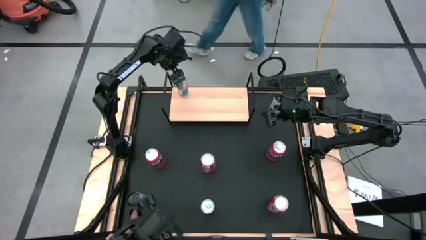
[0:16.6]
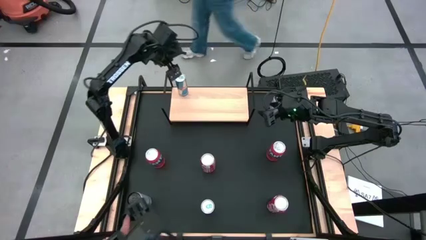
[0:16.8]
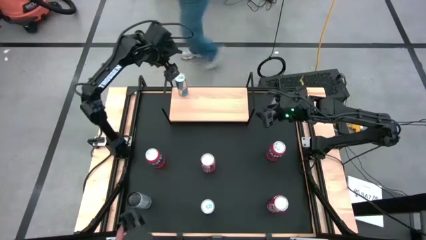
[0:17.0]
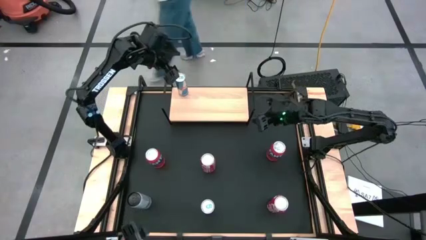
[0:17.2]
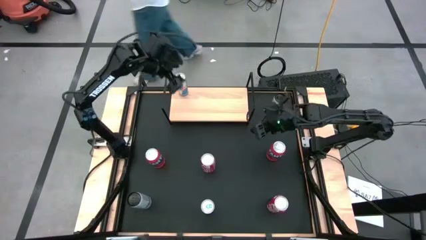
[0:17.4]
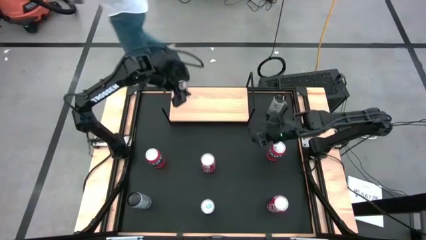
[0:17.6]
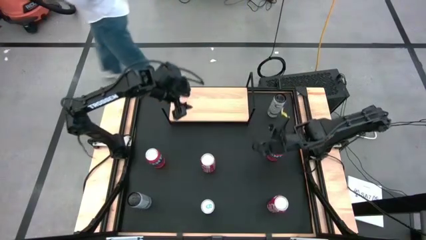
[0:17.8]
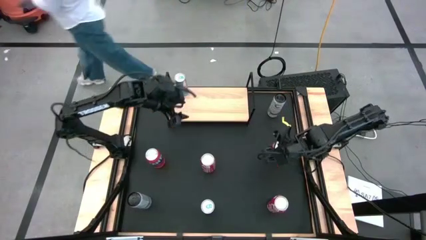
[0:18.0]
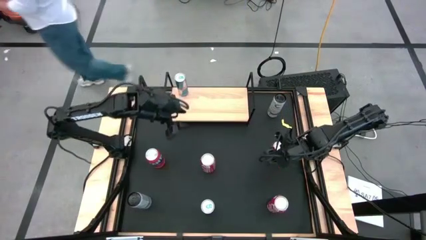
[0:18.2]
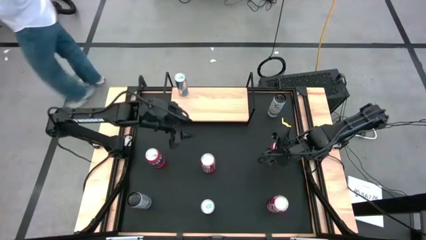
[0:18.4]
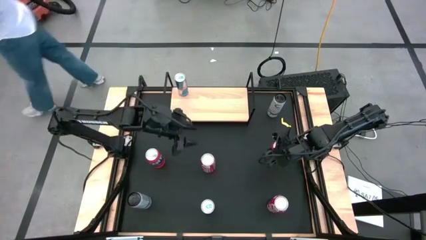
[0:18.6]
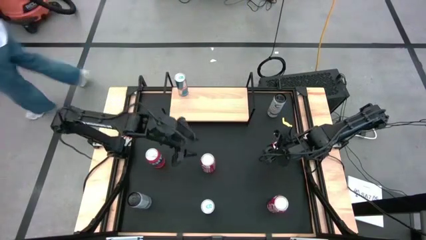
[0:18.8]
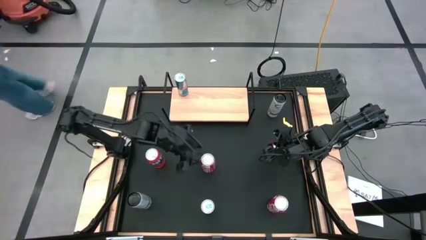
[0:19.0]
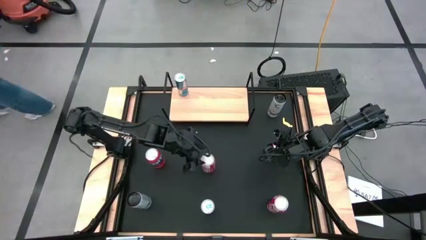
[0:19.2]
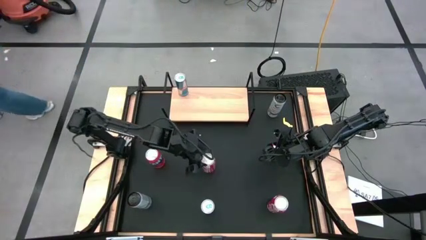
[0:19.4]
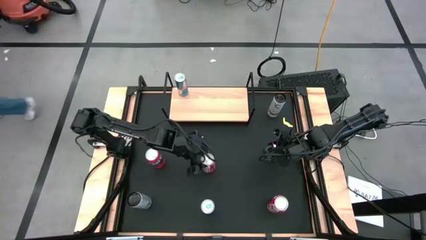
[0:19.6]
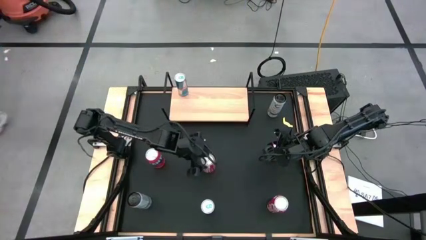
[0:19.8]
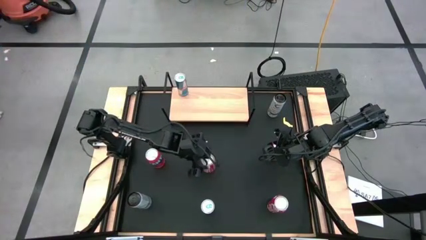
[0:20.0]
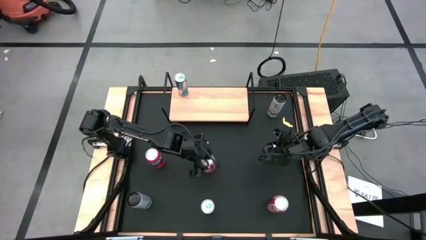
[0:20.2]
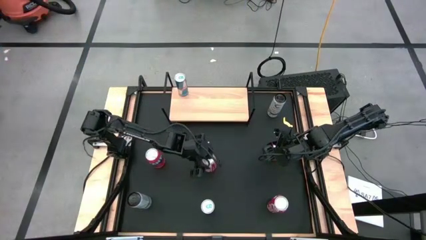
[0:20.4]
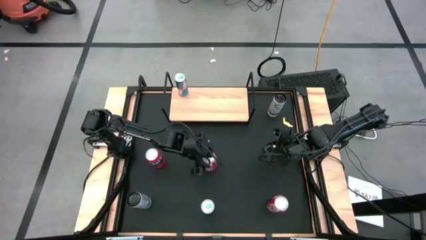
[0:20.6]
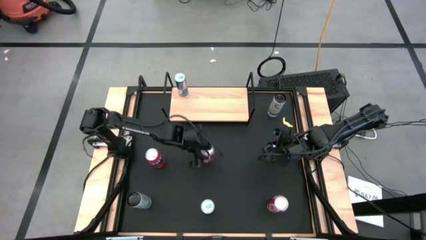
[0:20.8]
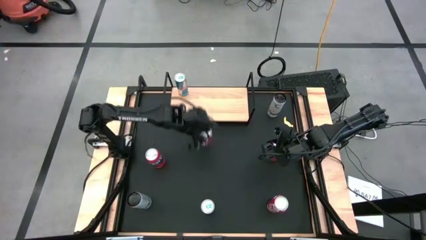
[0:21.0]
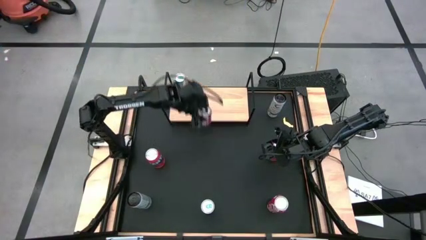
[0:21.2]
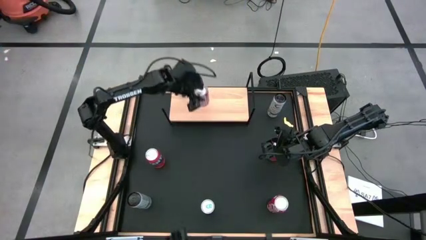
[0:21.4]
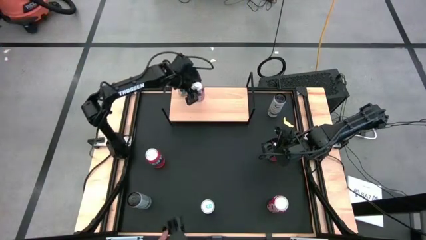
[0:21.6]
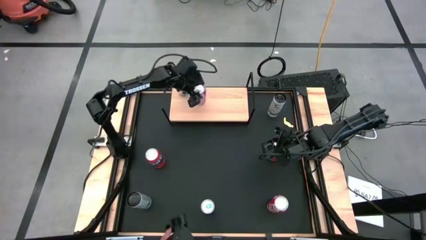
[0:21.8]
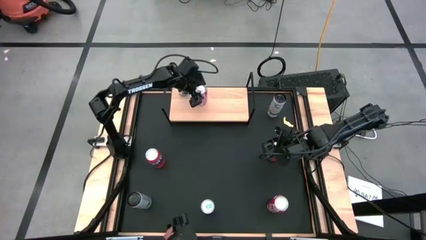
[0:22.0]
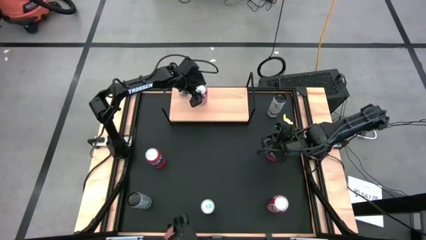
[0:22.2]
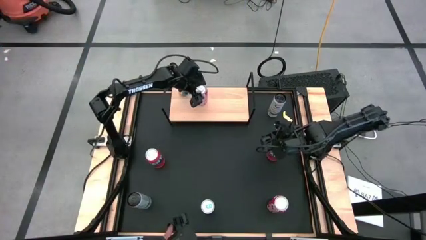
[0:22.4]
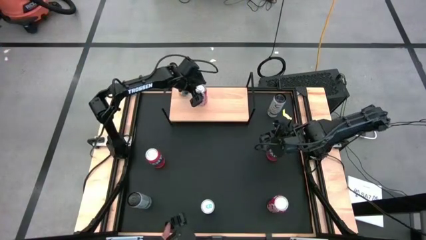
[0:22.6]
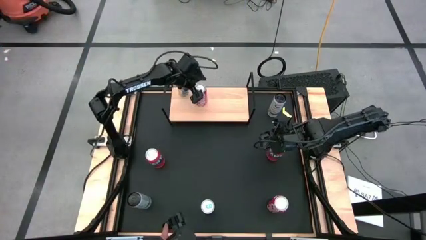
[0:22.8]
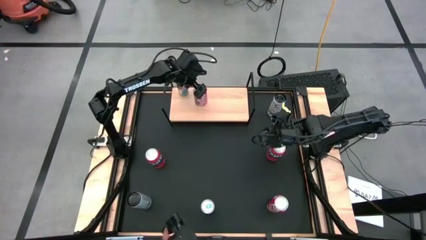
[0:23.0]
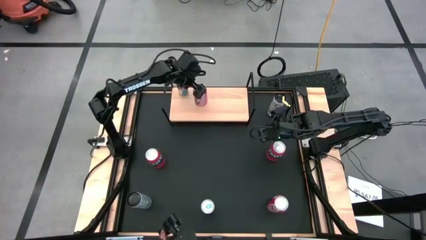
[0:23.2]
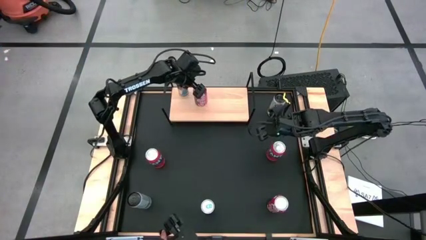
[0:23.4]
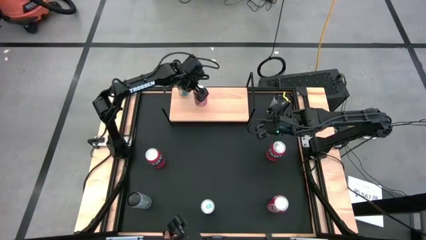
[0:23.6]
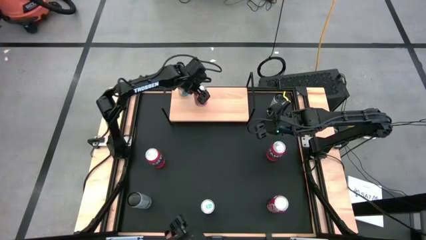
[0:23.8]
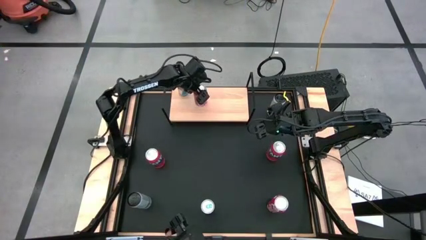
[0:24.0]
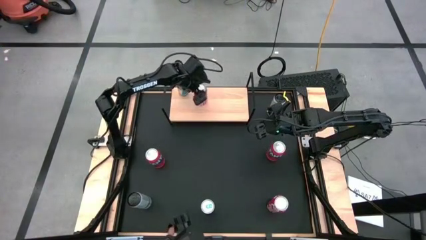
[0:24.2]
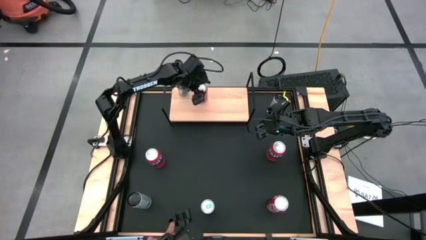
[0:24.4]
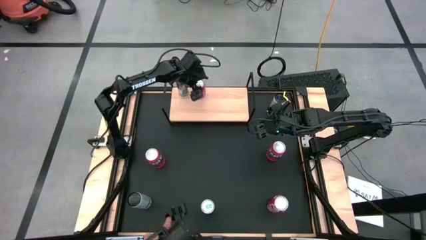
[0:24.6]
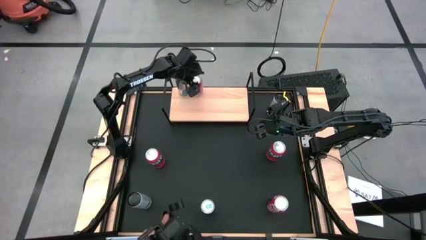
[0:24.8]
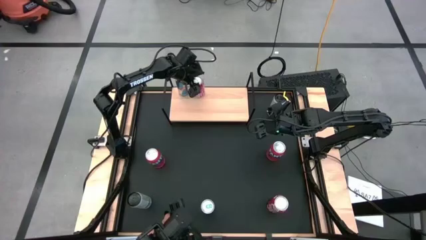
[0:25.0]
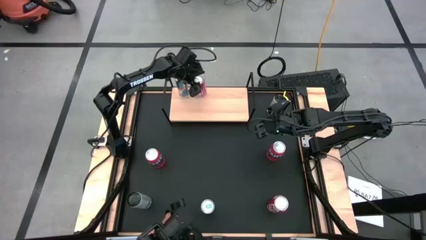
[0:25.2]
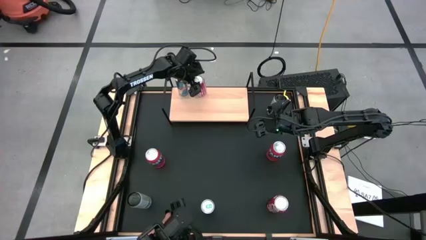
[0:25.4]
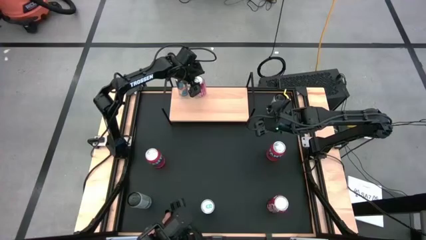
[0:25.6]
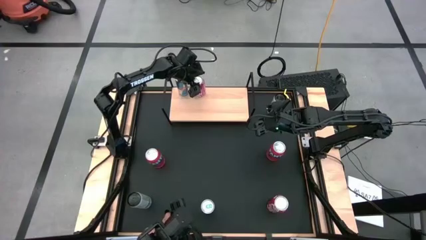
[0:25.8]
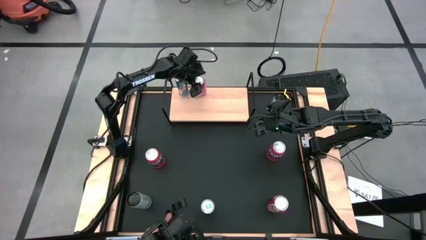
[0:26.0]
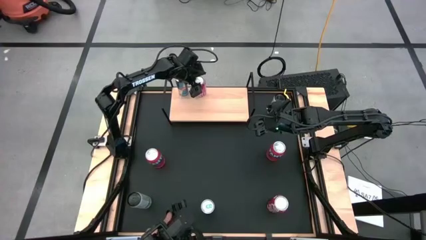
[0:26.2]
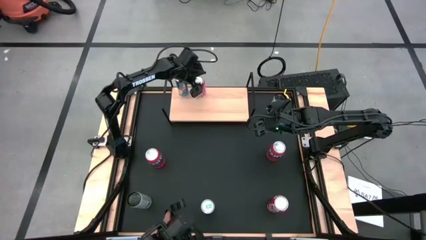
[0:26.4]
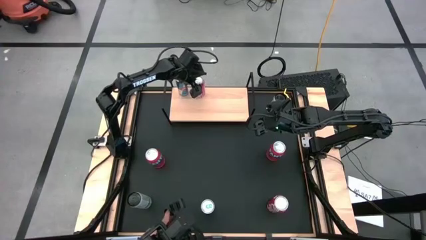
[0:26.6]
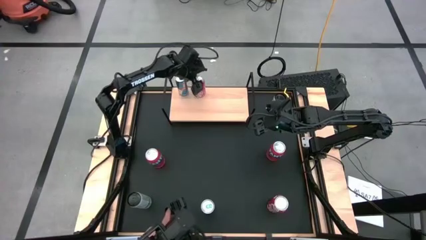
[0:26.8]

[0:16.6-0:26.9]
Task: Place canned beverage on shelf
Put the top red white soda can on the shelf
